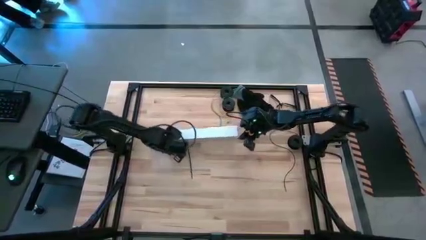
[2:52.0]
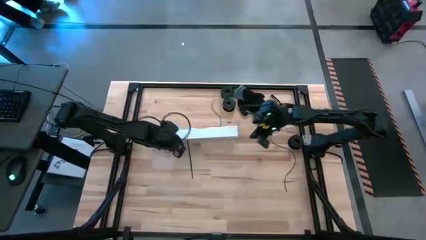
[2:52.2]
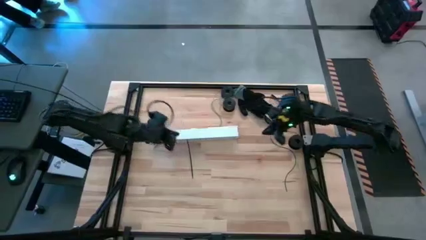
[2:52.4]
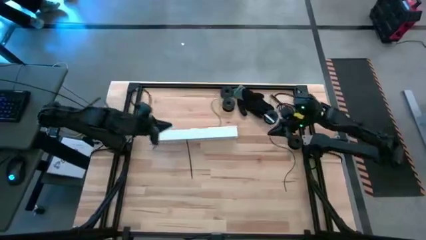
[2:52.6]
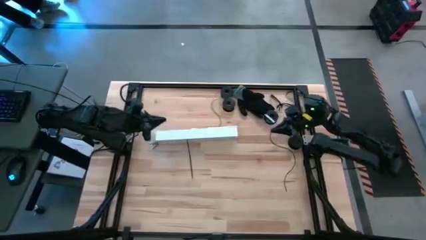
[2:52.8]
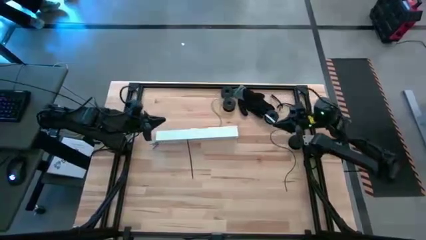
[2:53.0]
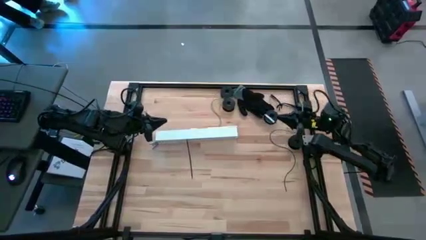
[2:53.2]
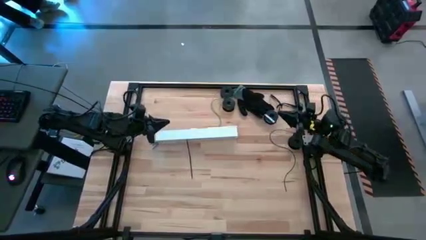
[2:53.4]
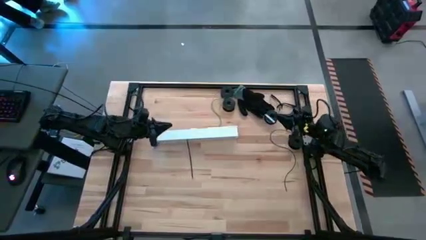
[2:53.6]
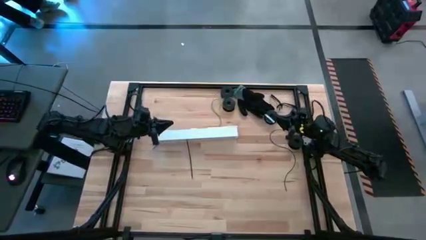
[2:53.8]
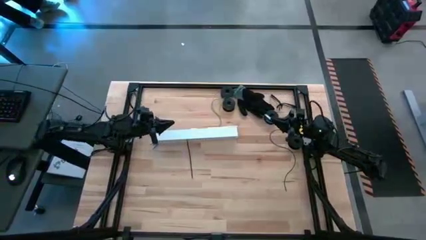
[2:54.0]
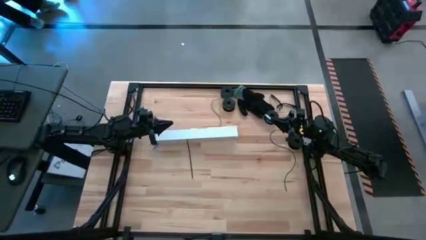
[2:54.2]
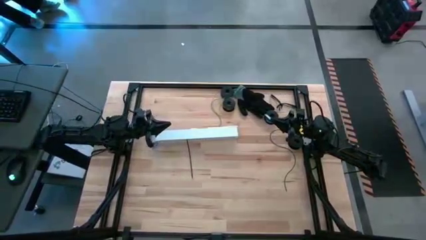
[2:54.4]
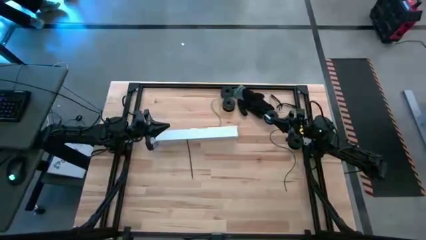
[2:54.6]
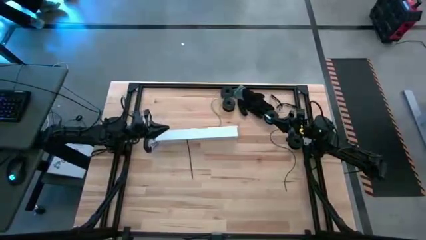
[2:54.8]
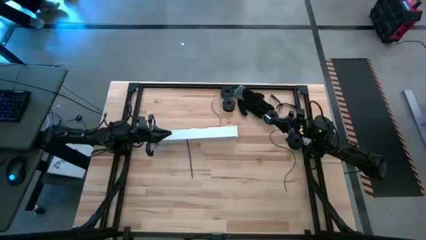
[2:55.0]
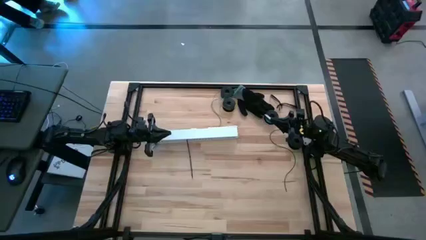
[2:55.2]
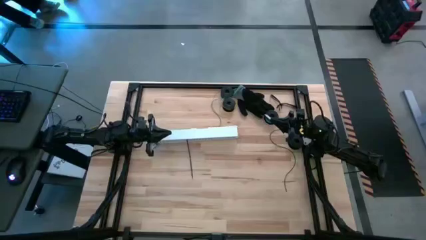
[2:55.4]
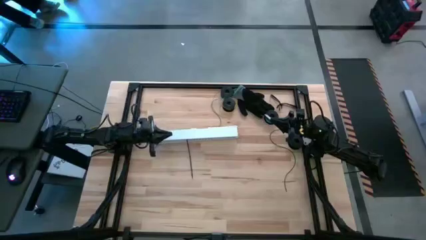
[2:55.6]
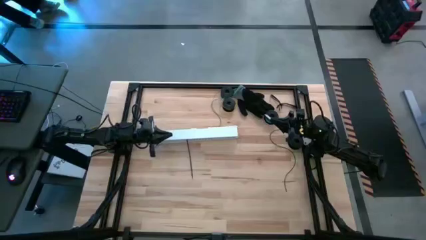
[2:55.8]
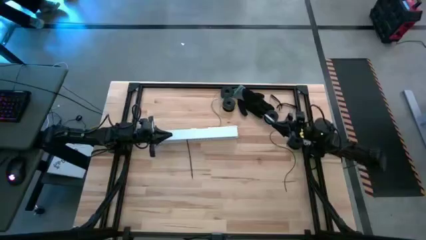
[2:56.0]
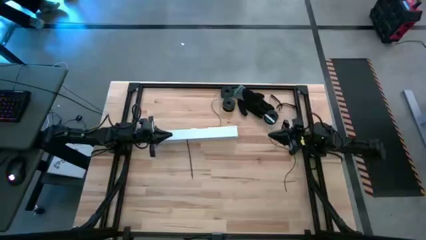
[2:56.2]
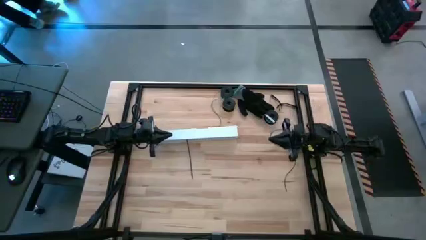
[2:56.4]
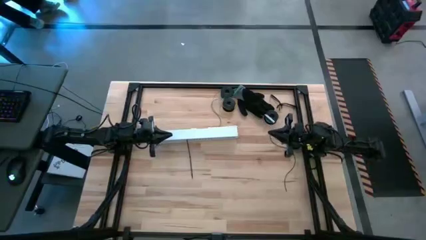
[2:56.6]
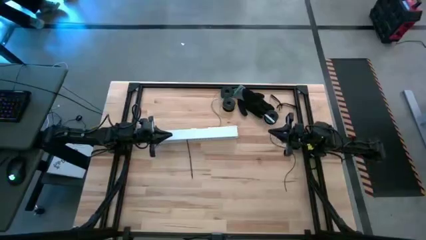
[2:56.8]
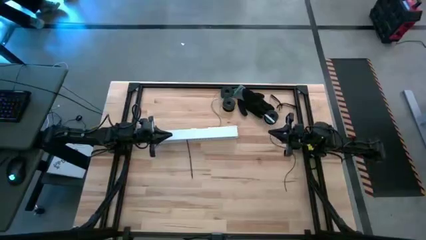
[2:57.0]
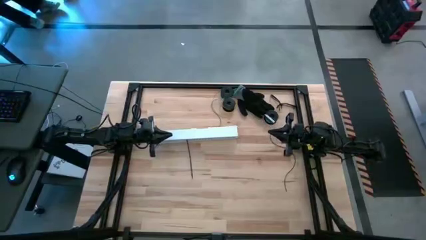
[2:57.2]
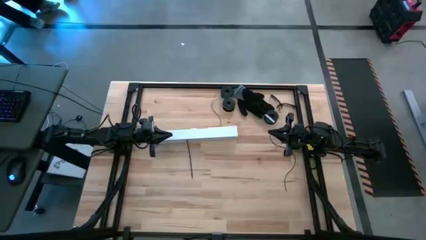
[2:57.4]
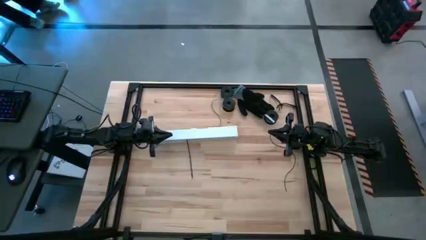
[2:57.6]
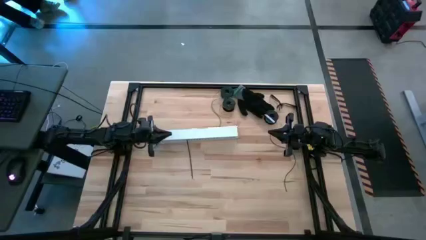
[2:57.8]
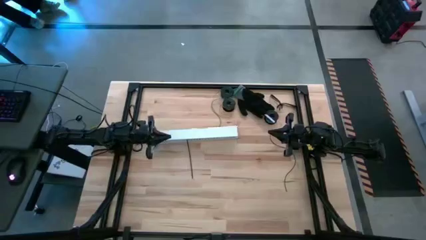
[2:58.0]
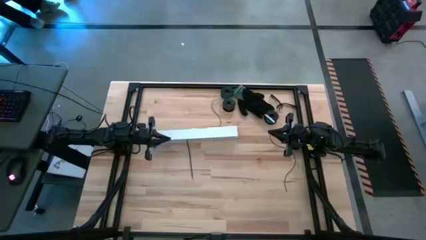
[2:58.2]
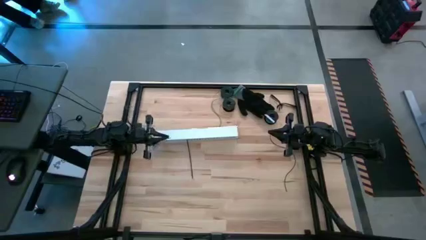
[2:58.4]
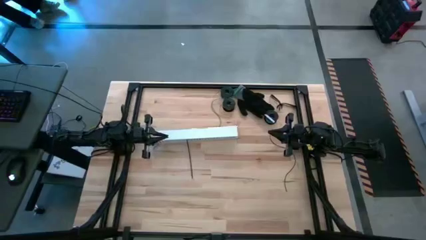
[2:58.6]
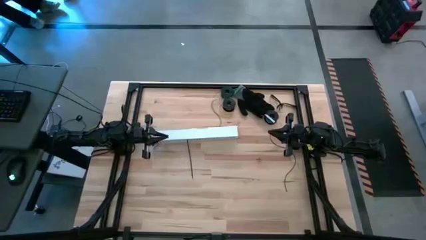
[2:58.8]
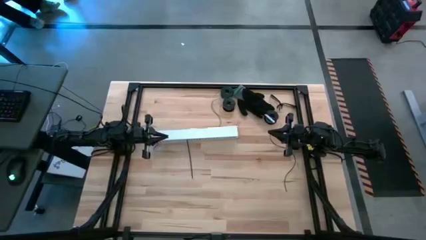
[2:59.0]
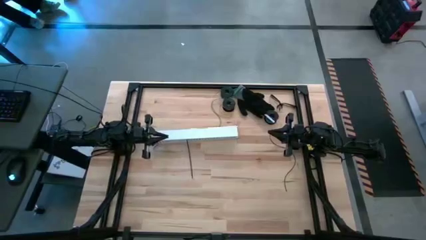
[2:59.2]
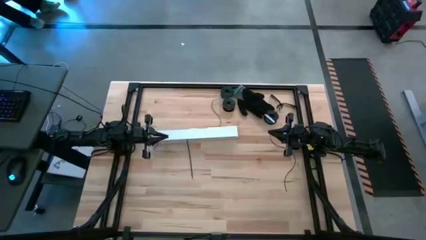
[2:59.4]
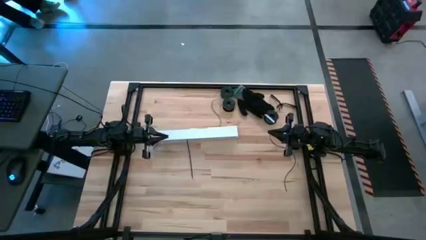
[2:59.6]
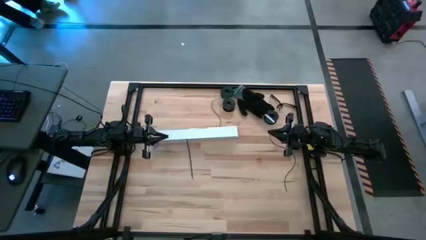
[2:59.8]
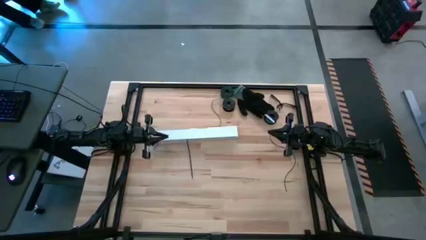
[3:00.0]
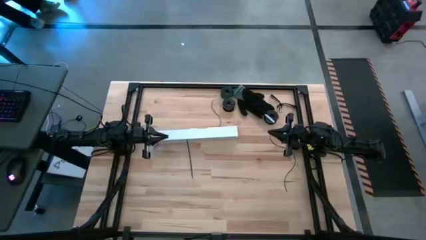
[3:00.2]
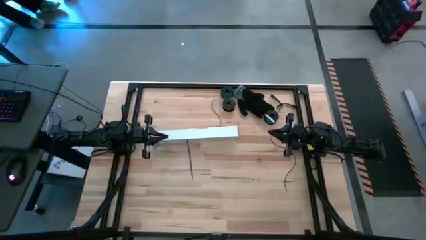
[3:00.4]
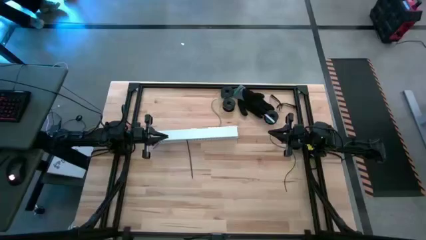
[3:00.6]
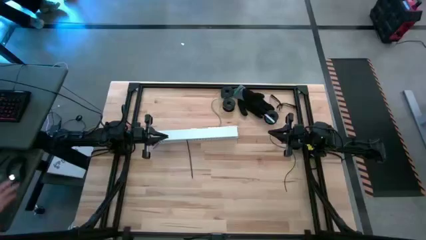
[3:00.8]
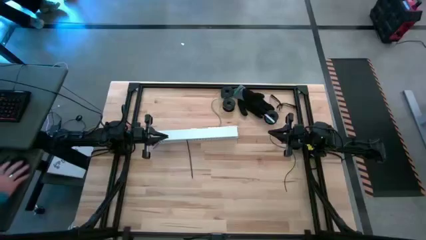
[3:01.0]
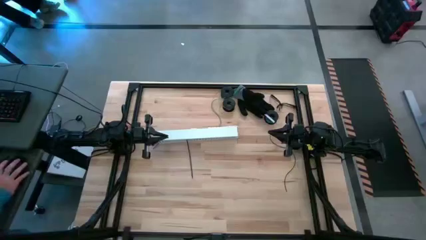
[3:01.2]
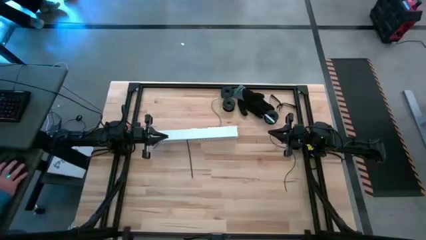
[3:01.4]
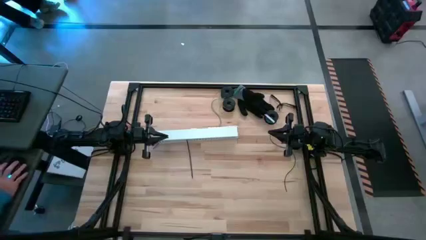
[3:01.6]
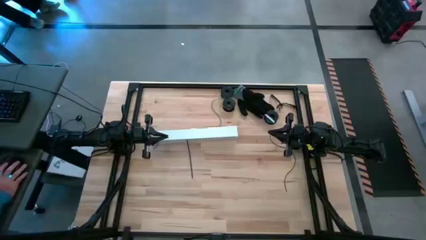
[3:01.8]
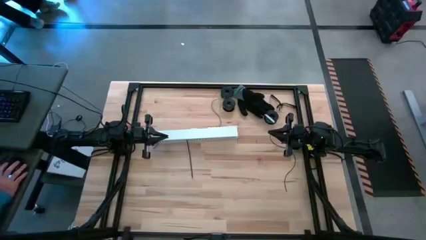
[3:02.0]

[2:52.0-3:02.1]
Task: Ziptie cables
Return to Home Position

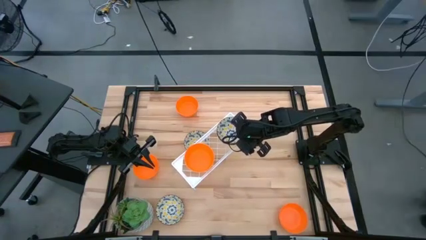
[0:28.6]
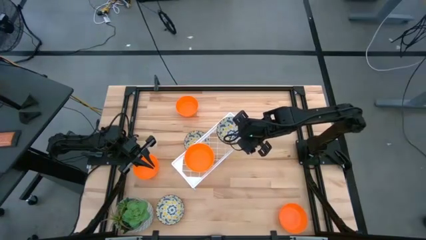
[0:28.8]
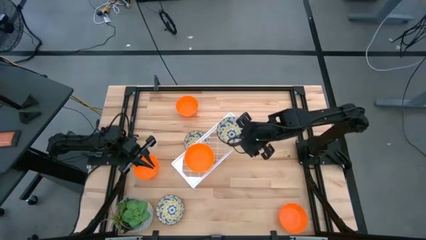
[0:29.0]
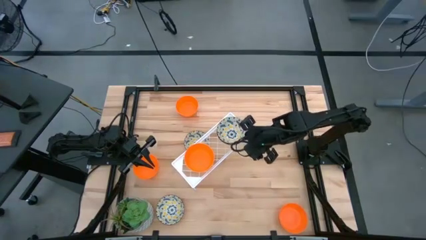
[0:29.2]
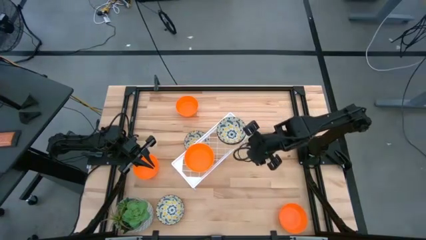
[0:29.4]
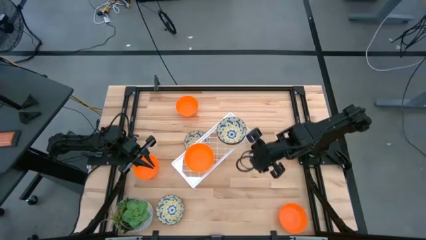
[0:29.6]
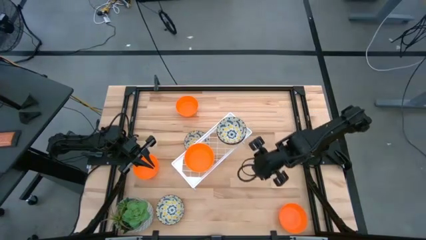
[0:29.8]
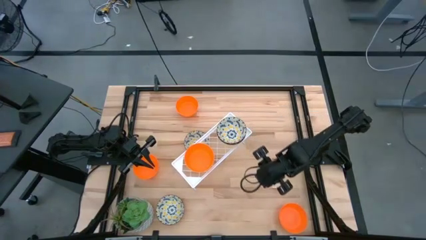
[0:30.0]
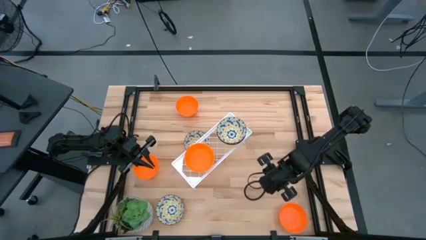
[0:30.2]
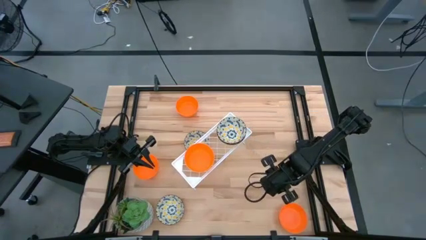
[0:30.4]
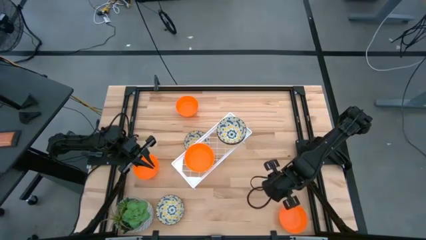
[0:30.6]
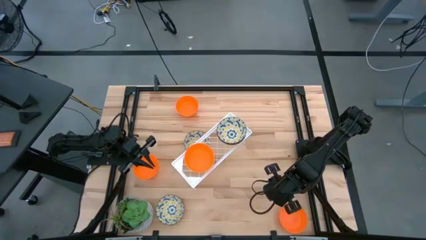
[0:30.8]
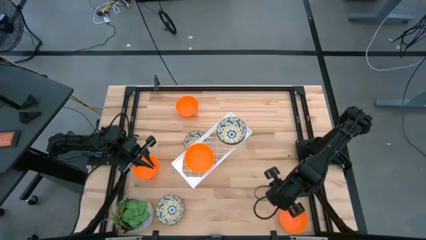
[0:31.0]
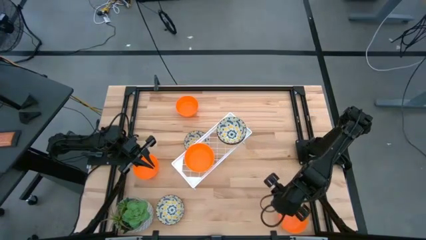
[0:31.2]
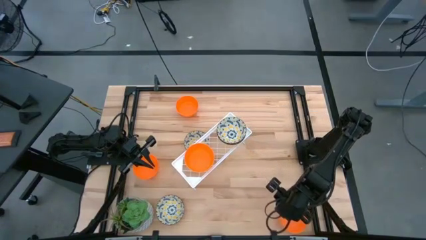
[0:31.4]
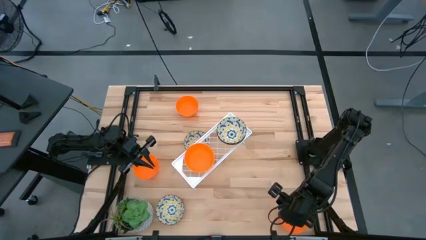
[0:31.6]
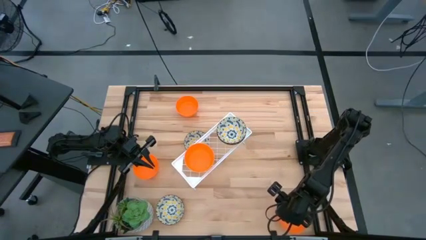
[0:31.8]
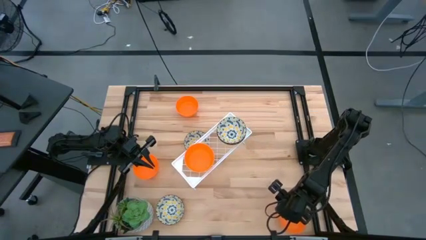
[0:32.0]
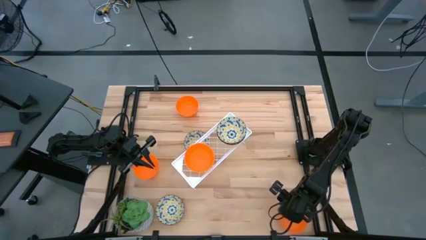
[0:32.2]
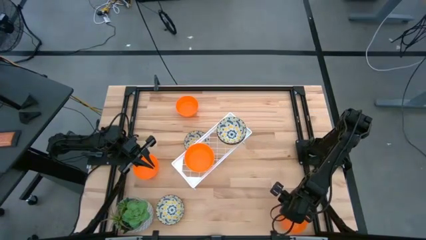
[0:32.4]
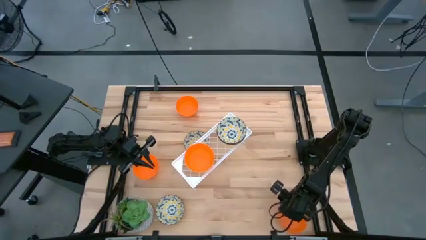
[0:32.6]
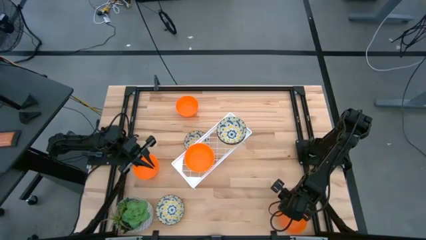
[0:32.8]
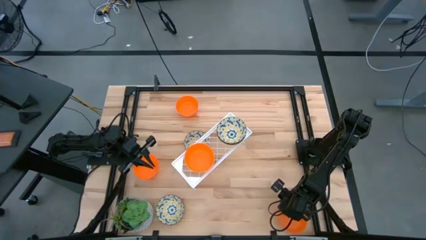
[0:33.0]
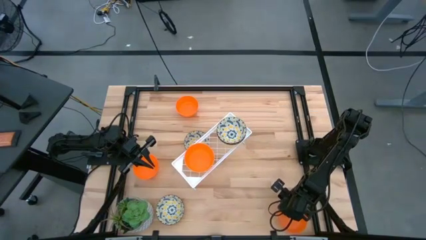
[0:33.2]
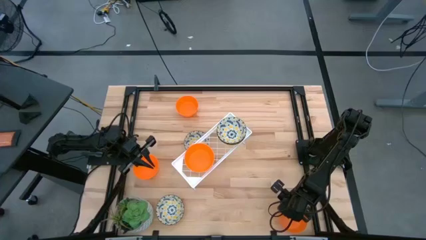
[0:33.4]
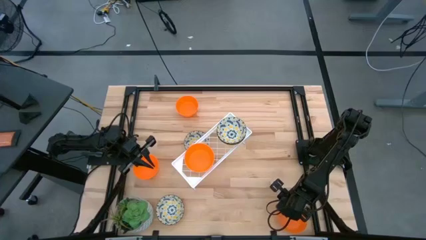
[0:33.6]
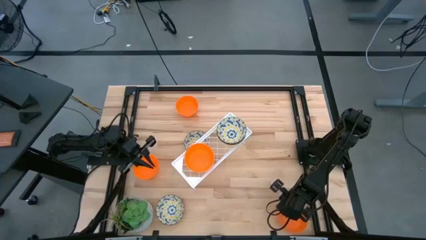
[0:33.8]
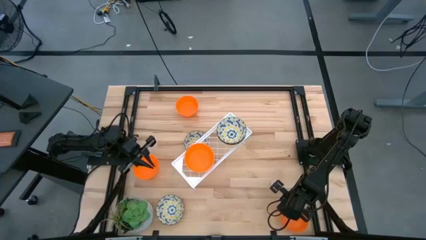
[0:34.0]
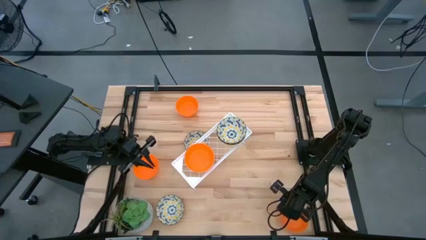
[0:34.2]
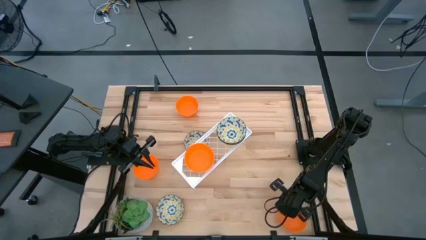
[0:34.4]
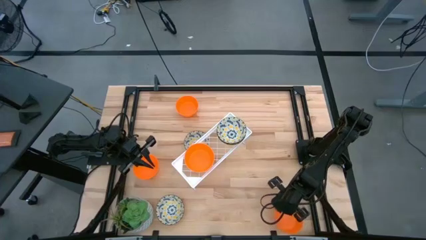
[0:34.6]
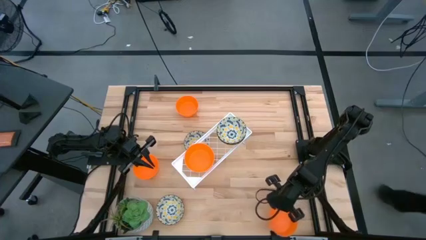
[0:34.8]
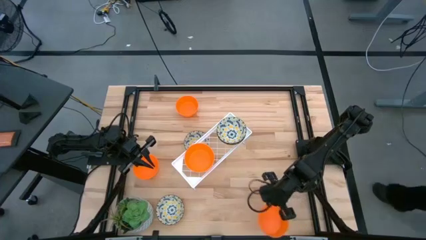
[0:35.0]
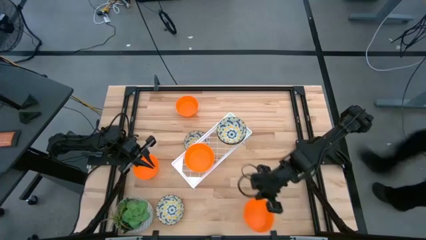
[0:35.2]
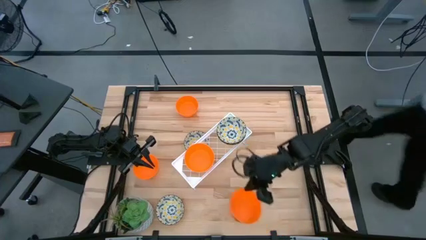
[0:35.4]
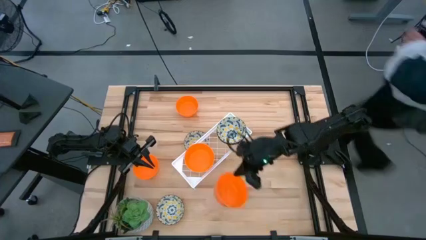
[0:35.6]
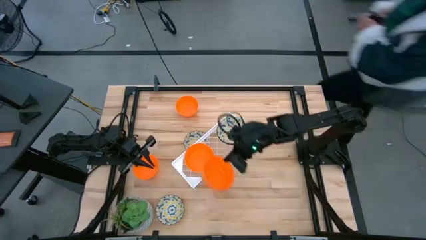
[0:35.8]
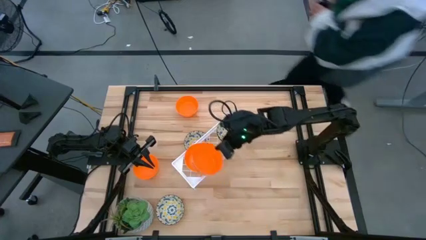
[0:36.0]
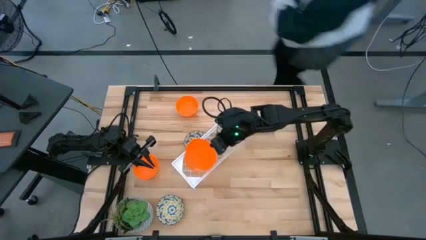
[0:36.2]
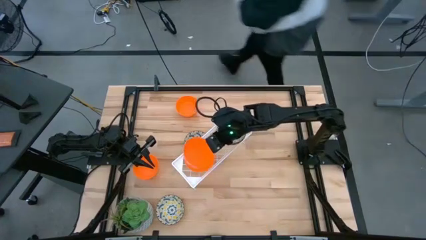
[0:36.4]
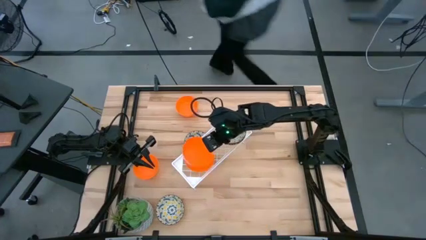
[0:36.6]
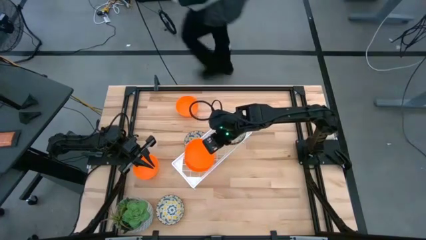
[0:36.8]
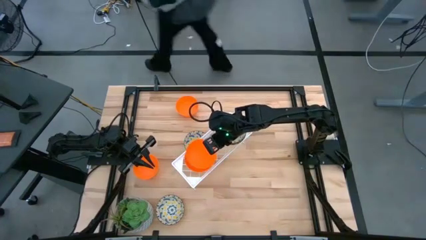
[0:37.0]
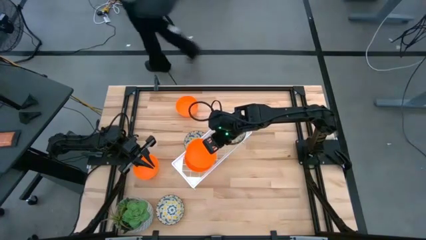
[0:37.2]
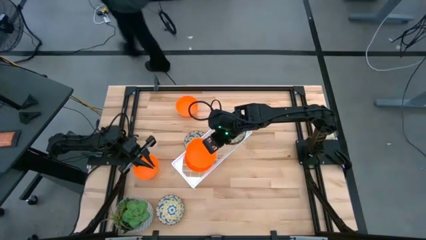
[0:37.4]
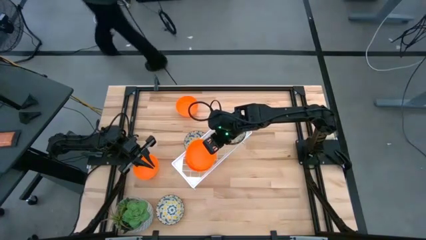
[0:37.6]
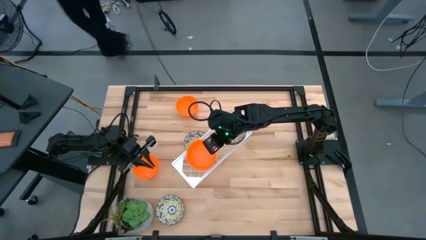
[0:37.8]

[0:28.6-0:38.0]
Task: Pick & Place Mini bowls
Stack the orange bowl on top of the orange bowl on the shelf
